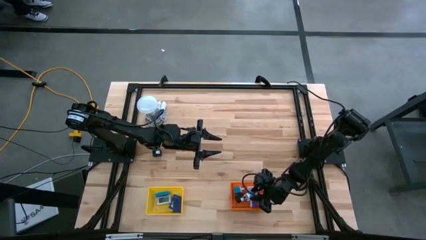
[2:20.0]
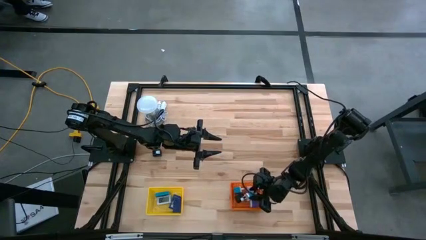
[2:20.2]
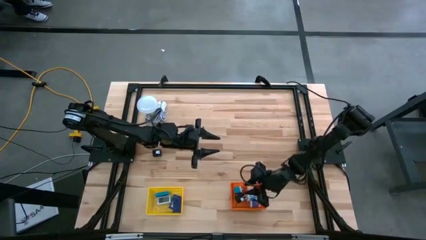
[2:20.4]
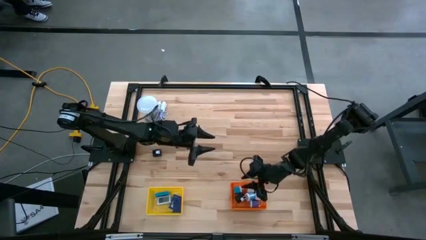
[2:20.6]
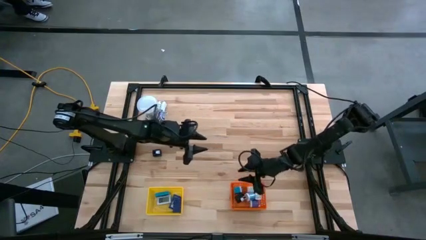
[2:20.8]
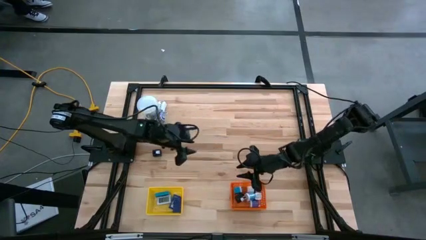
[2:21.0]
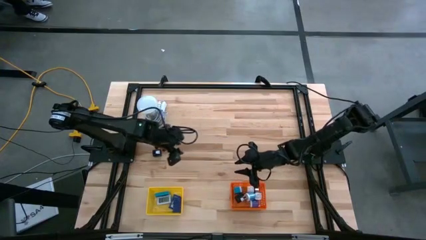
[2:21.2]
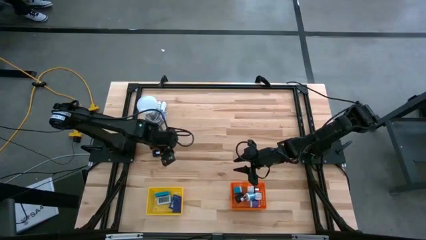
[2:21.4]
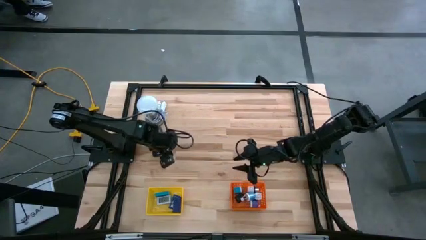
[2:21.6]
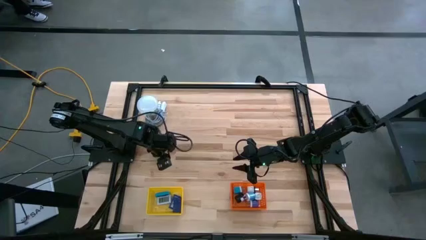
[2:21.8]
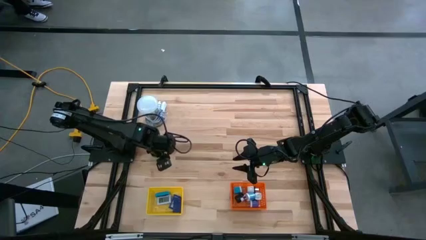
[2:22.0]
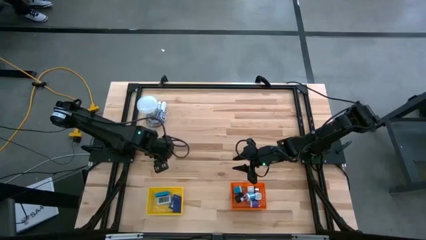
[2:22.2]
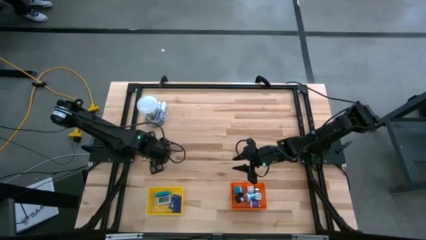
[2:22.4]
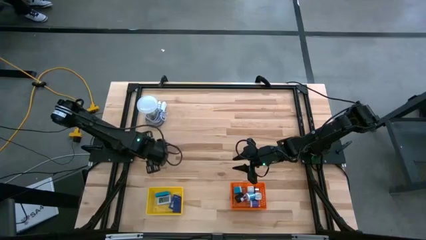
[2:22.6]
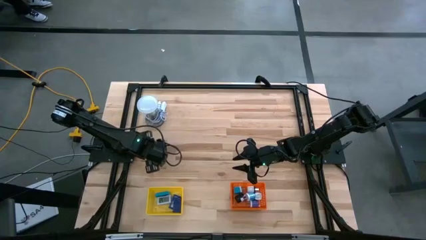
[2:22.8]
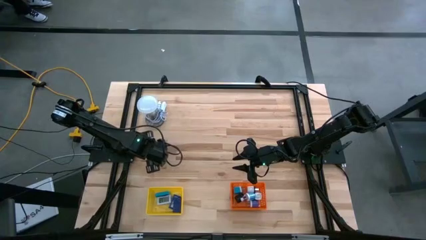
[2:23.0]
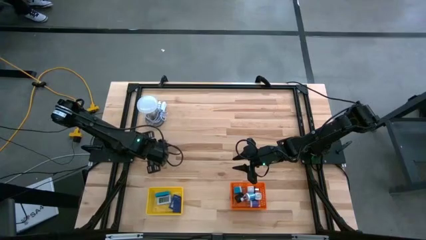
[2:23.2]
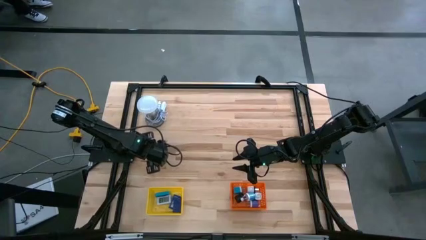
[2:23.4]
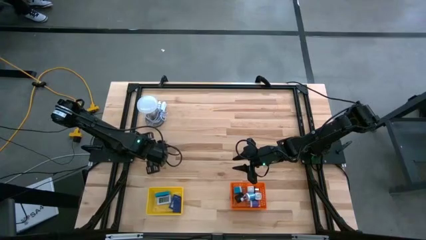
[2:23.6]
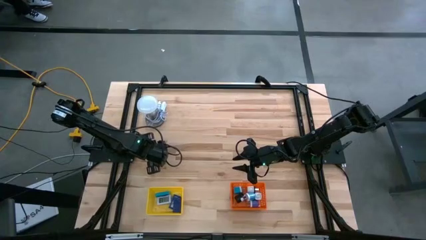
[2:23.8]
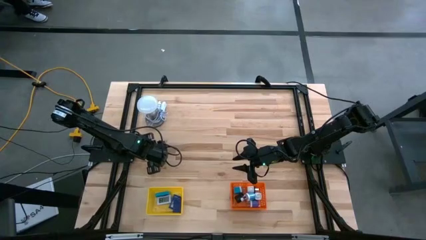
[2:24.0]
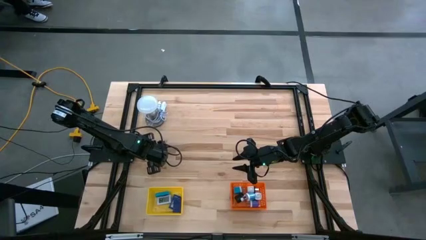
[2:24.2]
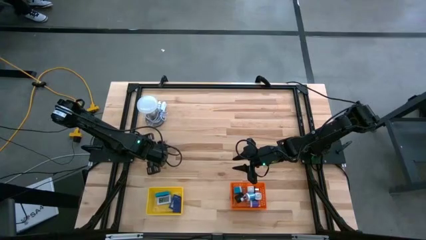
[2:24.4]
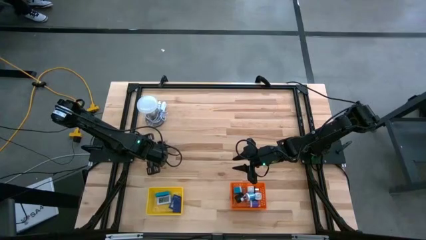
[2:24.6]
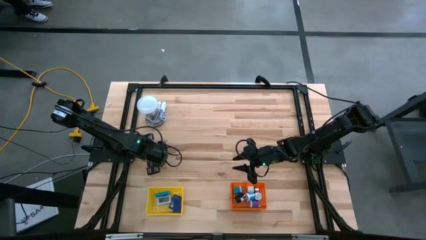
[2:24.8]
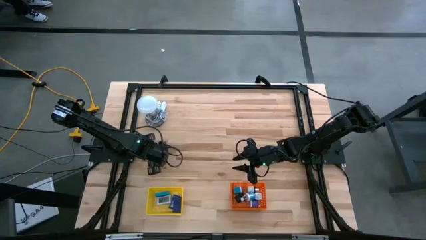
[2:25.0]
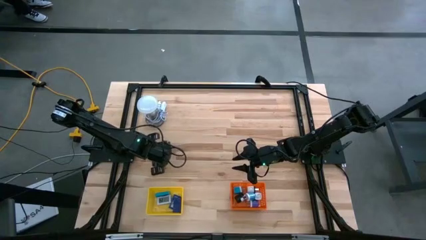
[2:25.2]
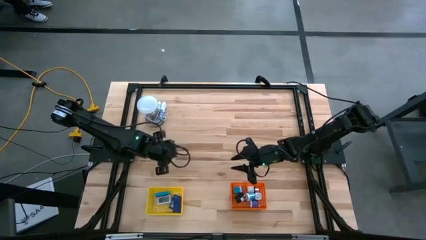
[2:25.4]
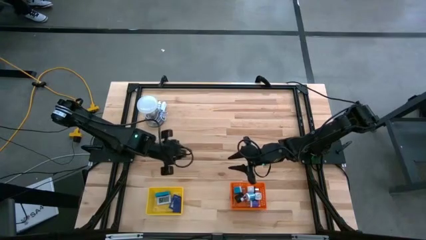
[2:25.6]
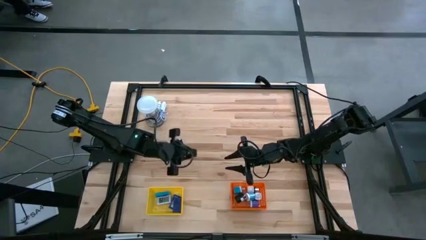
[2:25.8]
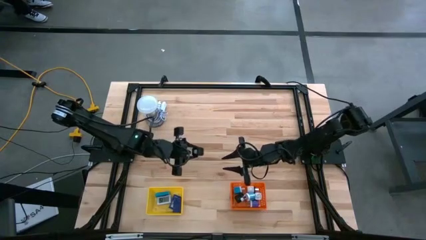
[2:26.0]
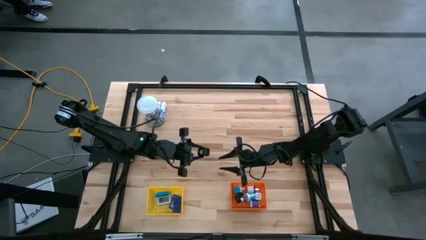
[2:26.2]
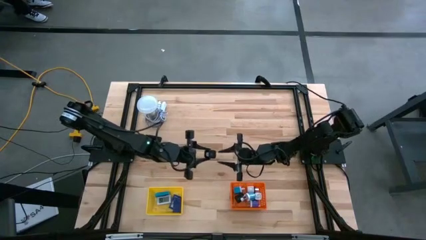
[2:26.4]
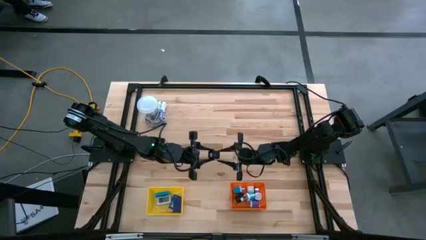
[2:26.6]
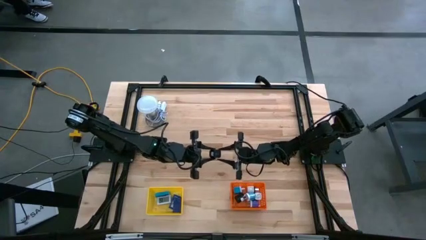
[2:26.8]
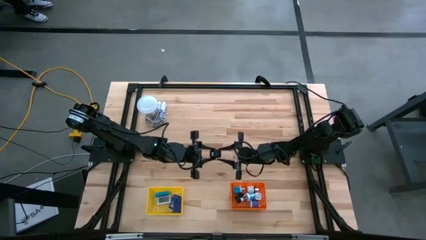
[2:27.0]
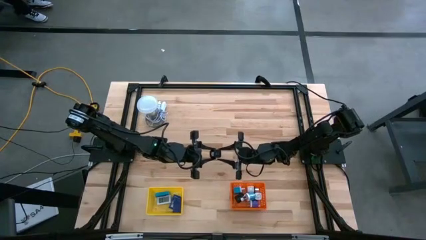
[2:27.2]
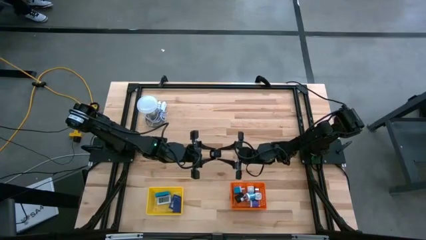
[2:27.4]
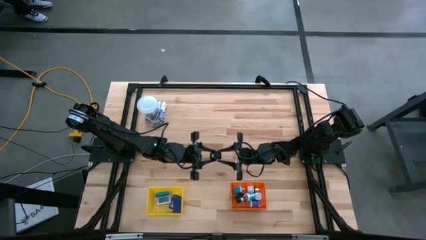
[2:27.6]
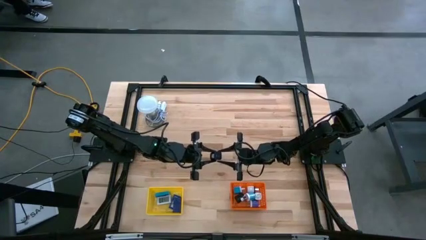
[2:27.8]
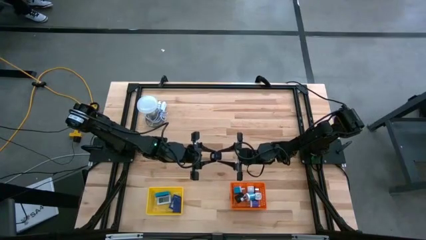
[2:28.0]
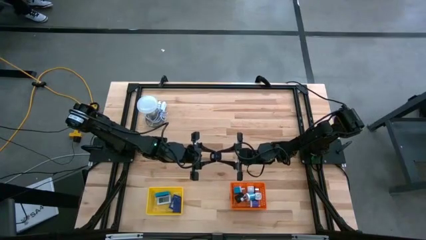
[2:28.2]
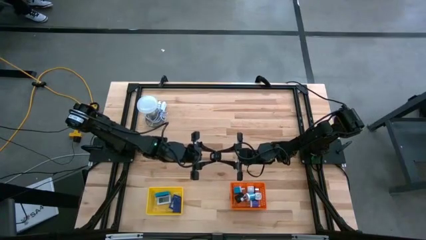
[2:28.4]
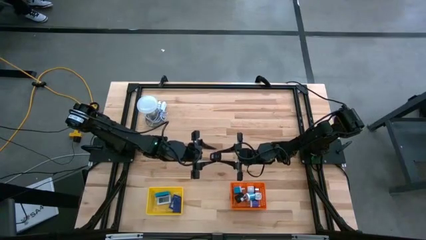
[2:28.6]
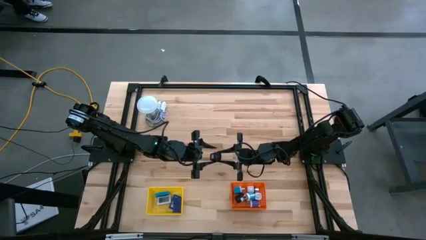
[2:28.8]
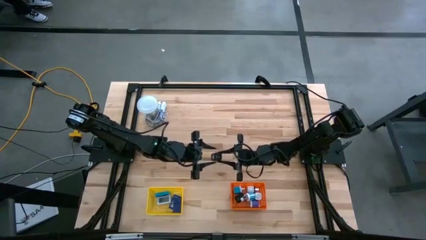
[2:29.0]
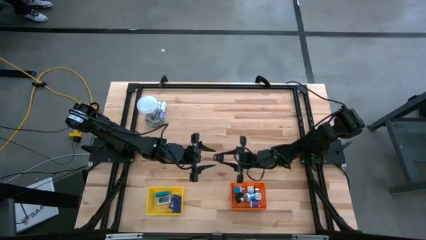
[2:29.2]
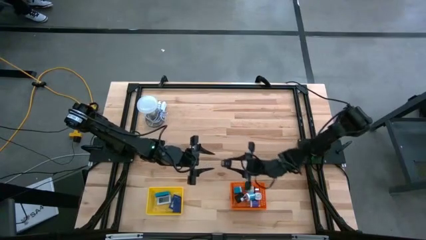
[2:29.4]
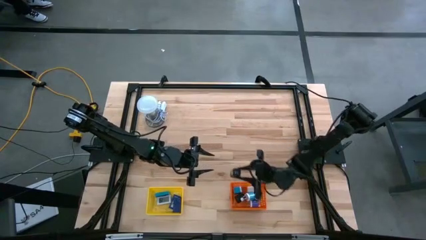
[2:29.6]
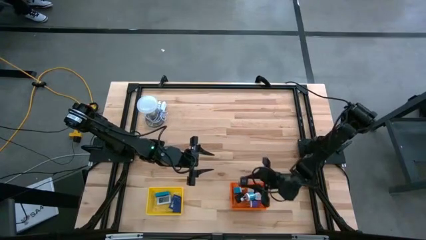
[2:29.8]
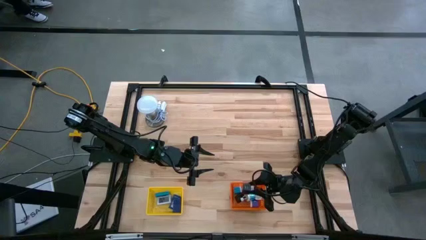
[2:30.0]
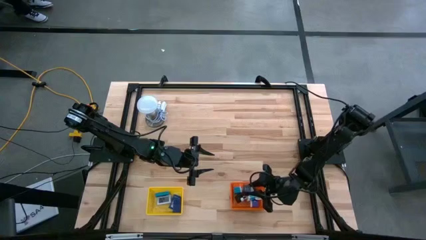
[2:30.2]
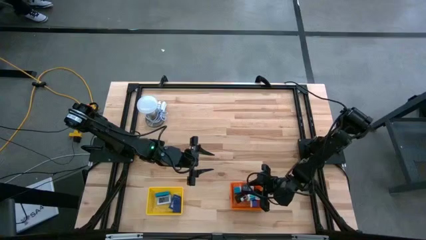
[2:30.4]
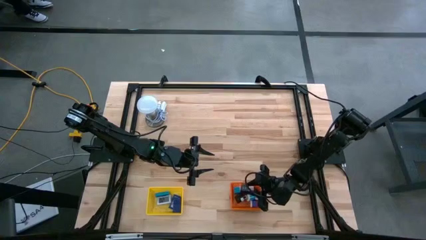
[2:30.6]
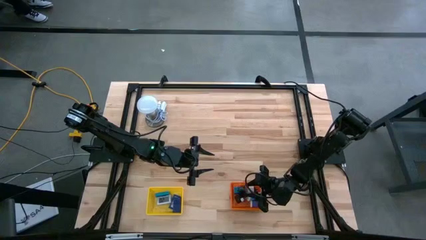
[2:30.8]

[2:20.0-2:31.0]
Task: Pick & Place Office items
Put the black charger adapter into the orange bin
